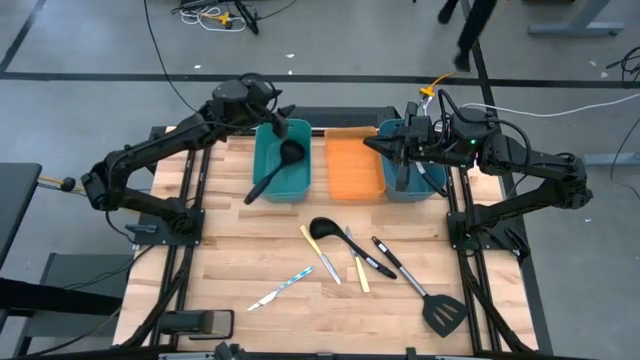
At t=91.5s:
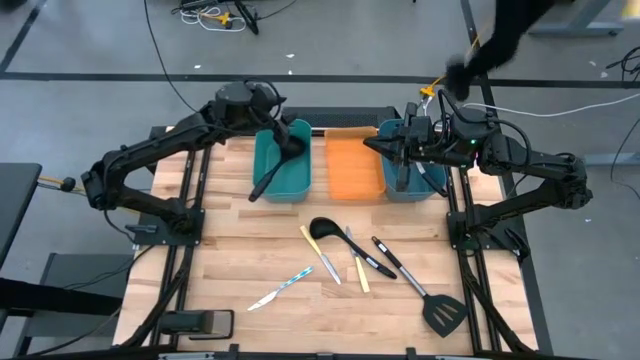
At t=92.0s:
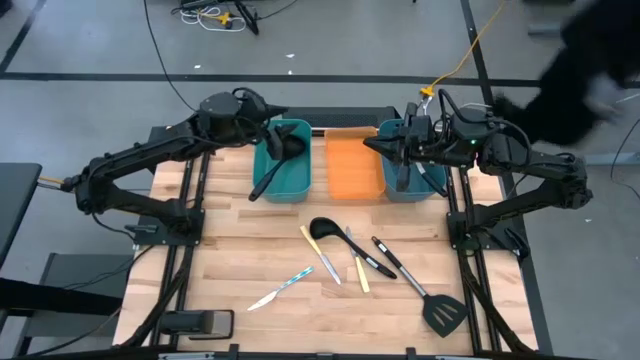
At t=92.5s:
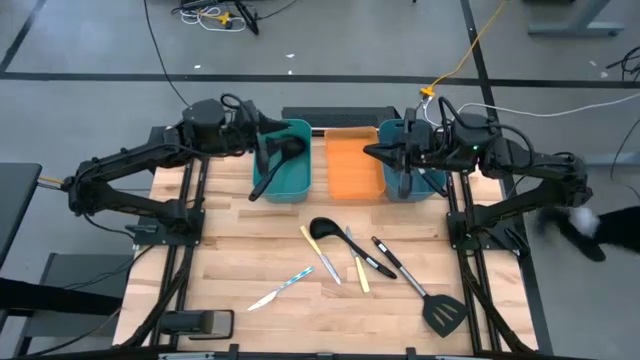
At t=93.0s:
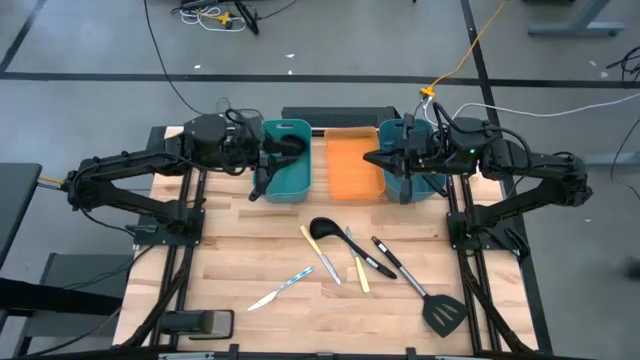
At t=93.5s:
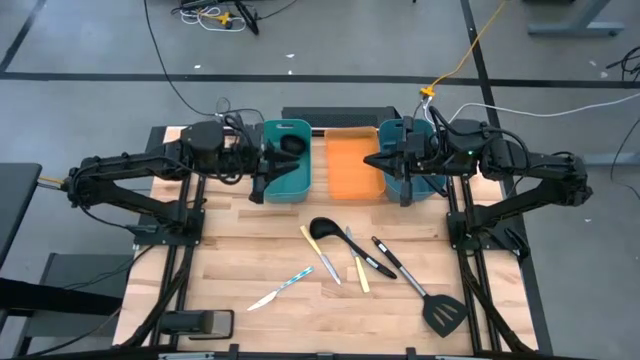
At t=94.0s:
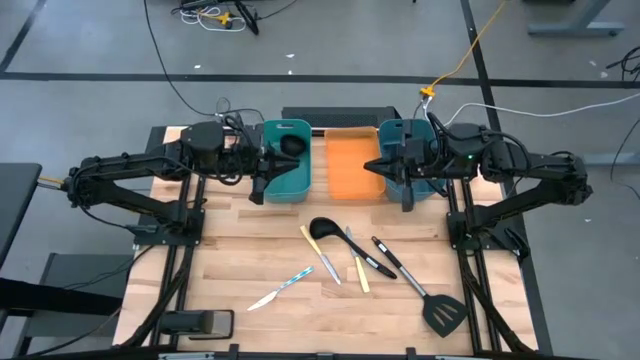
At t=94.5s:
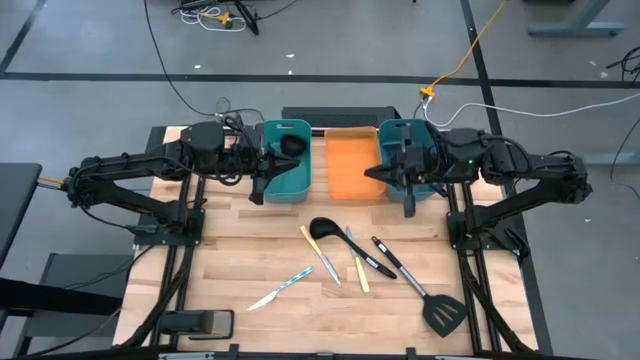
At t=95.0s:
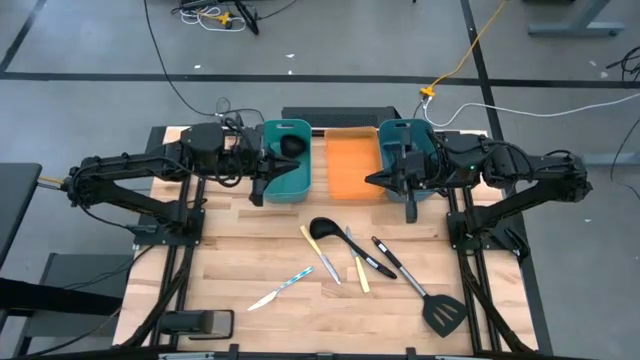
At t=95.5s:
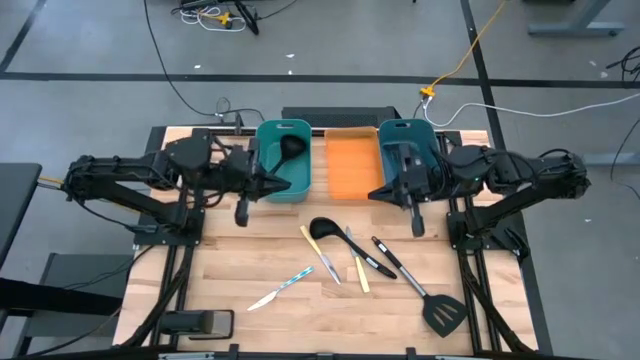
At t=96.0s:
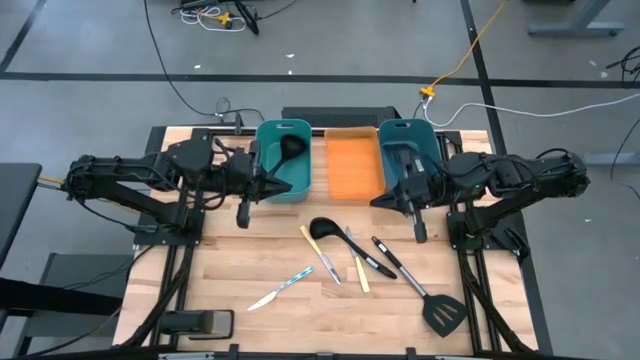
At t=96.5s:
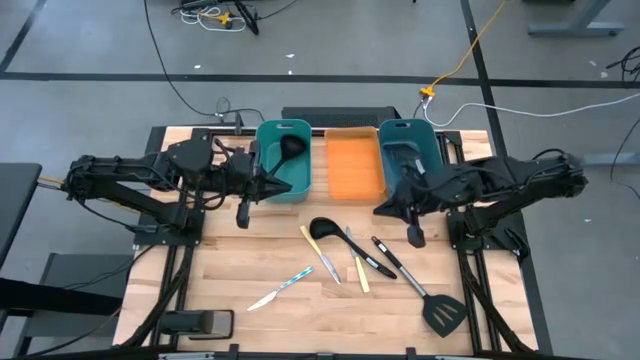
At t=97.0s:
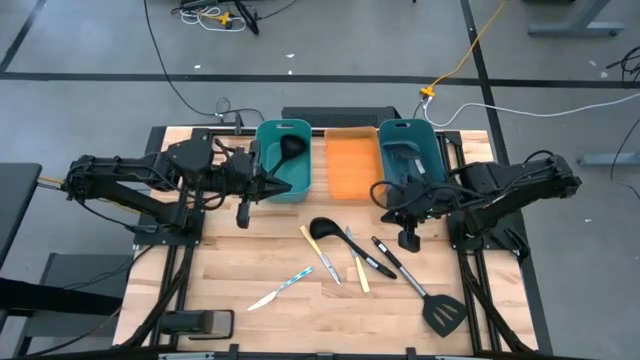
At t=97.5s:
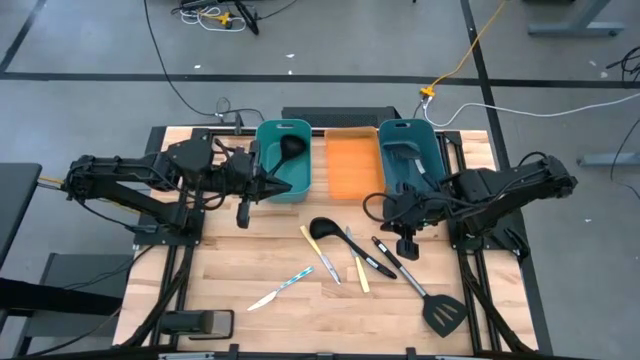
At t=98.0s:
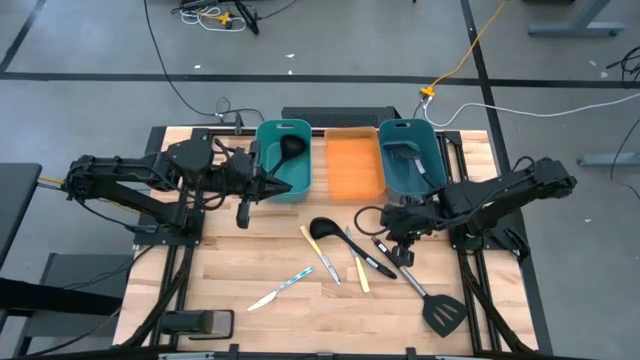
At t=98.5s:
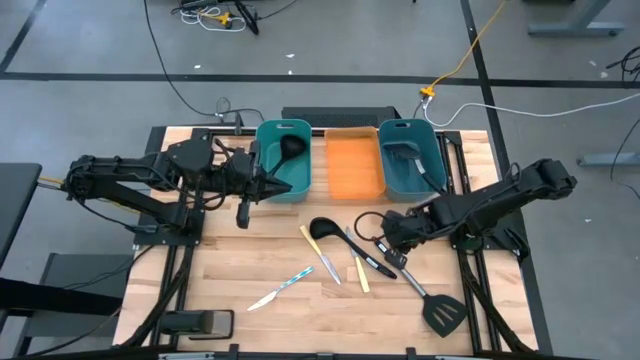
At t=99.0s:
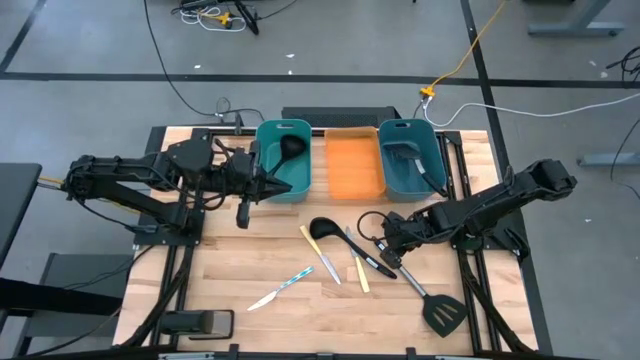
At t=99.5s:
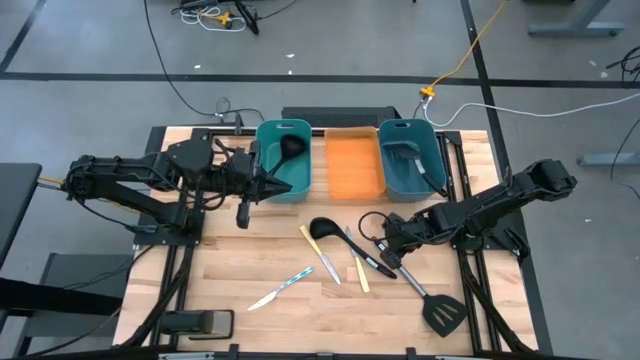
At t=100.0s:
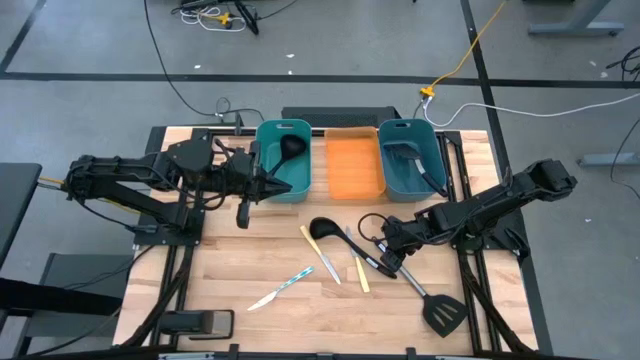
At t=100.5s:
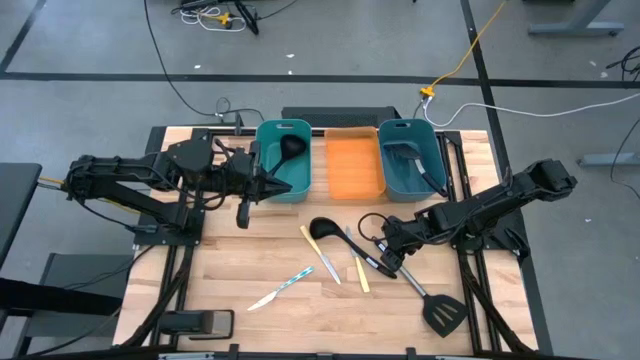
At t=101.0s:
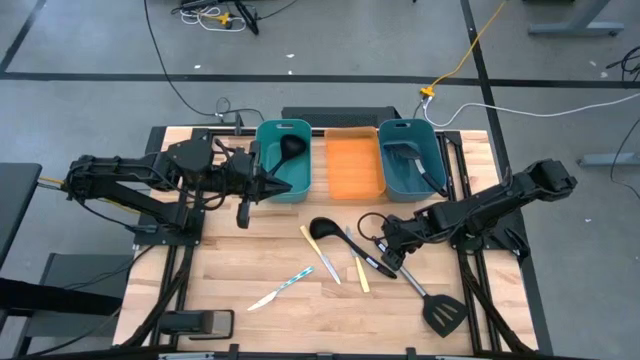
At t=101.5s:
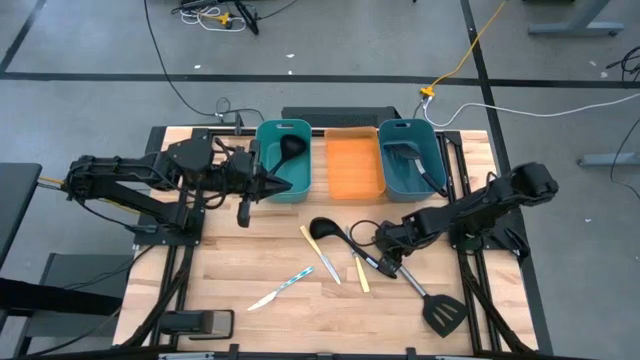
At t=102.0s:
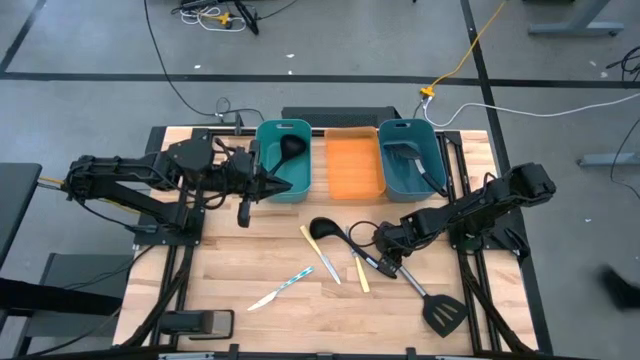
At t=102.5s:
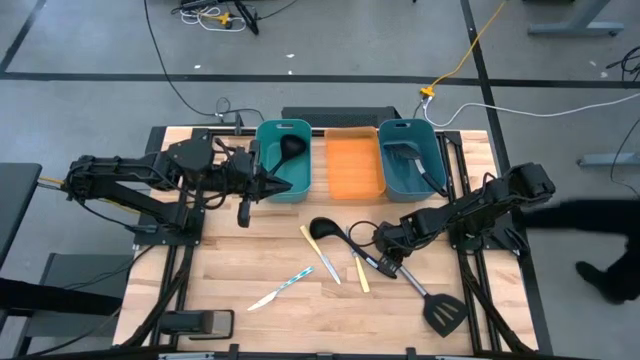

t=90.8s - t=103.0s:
Task: Pick & Place Kitchen Items
Put the black spatula into the blue bin

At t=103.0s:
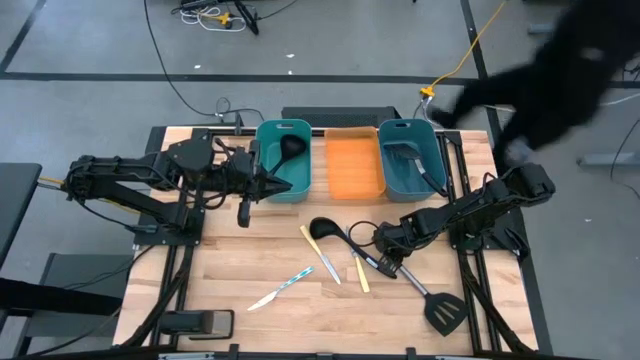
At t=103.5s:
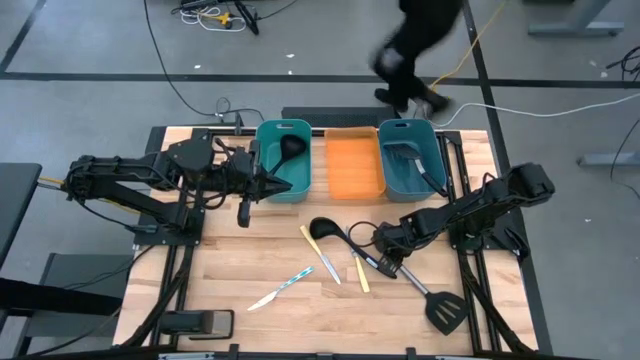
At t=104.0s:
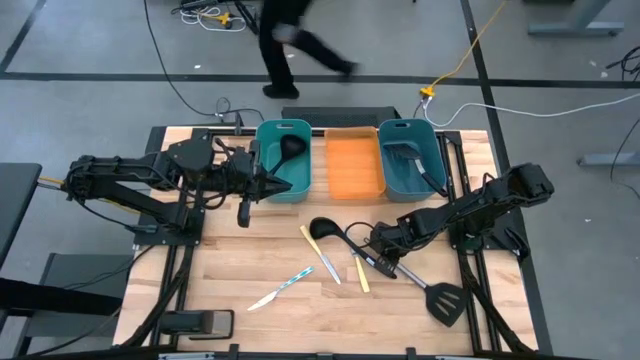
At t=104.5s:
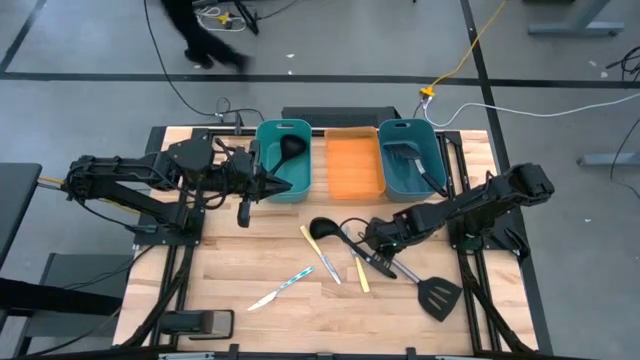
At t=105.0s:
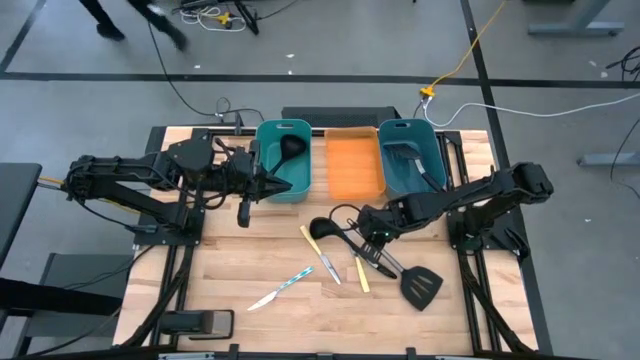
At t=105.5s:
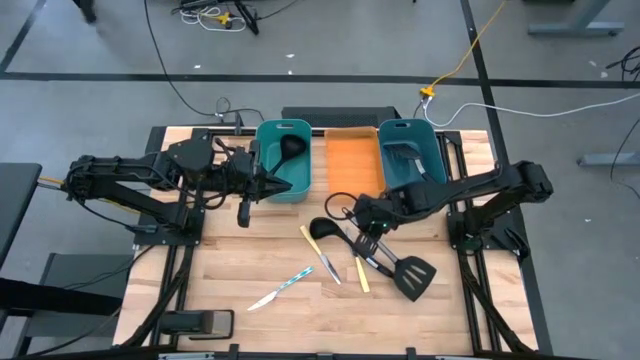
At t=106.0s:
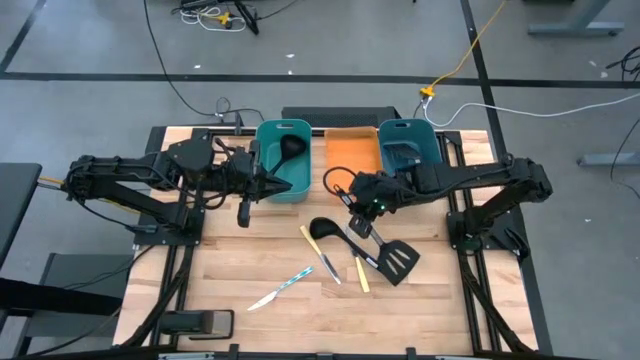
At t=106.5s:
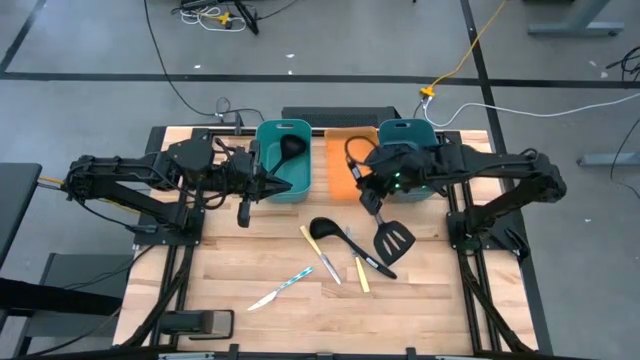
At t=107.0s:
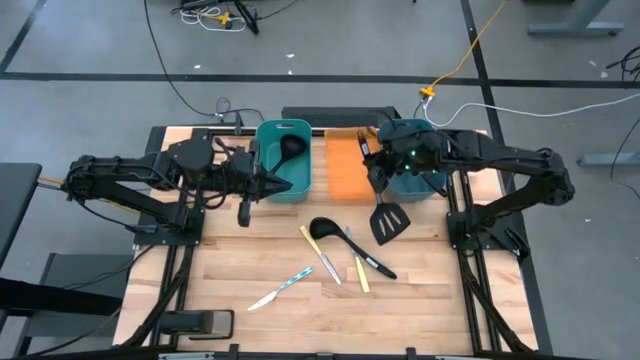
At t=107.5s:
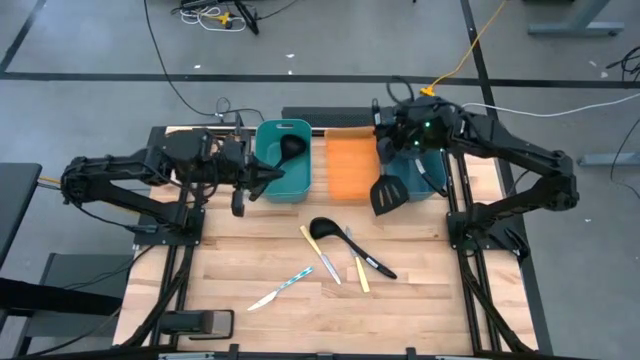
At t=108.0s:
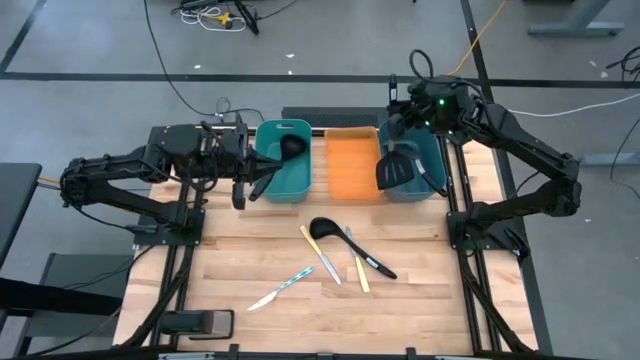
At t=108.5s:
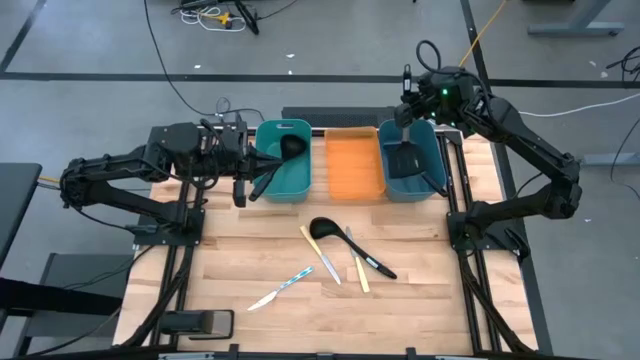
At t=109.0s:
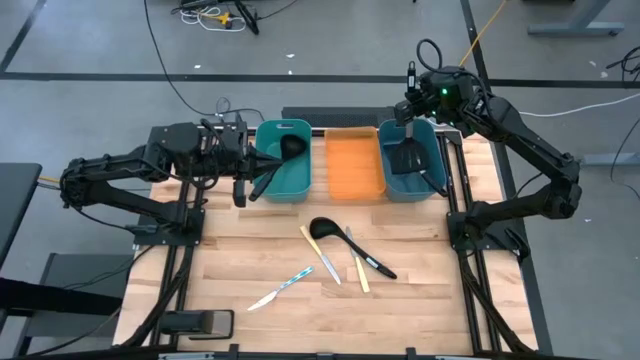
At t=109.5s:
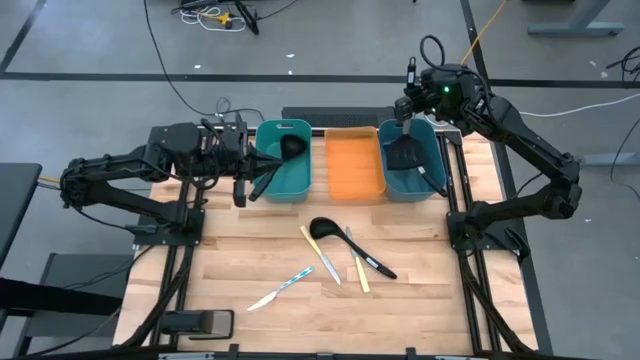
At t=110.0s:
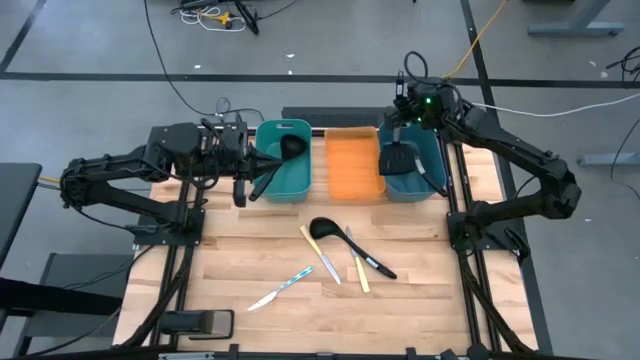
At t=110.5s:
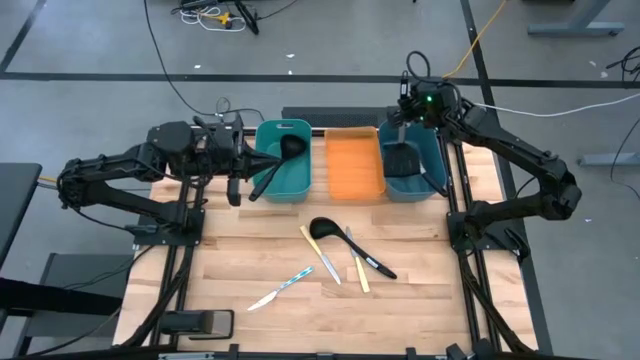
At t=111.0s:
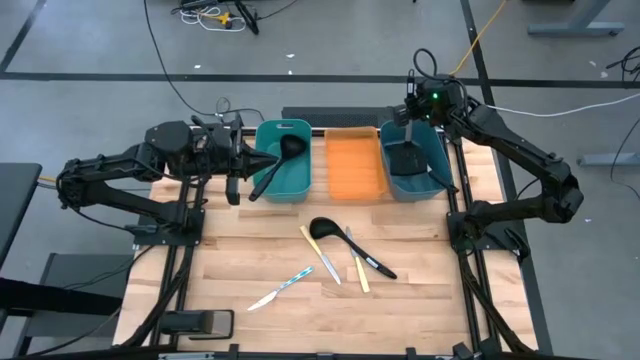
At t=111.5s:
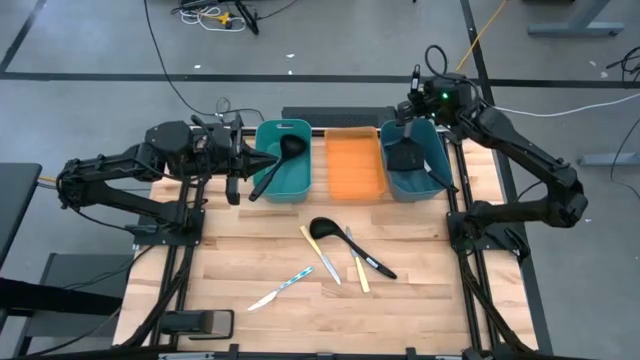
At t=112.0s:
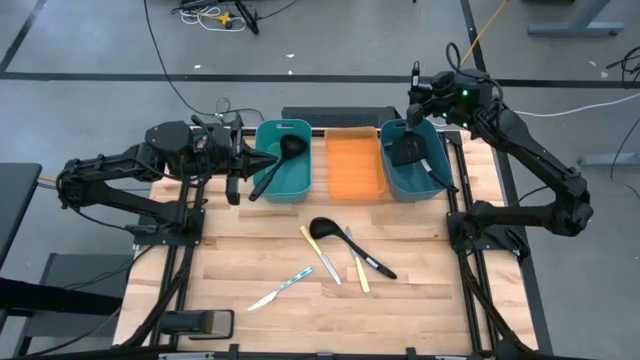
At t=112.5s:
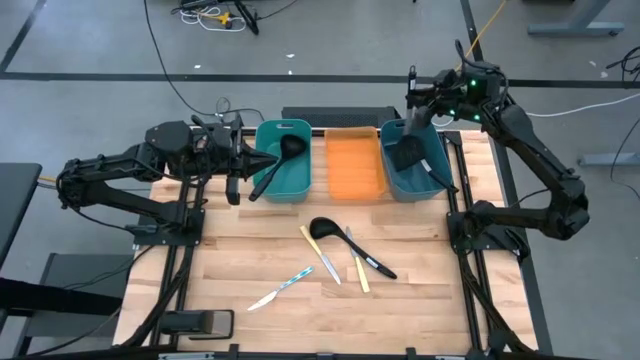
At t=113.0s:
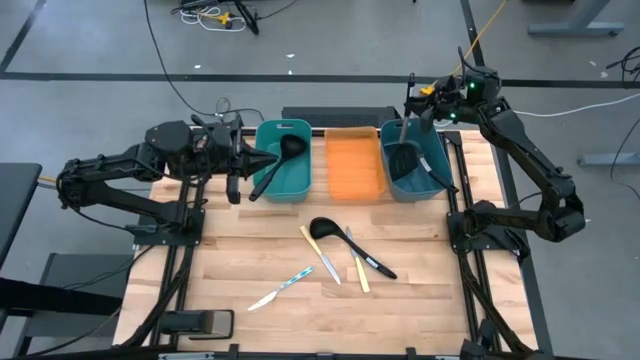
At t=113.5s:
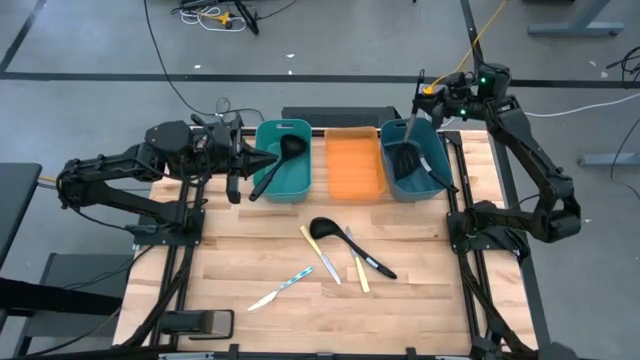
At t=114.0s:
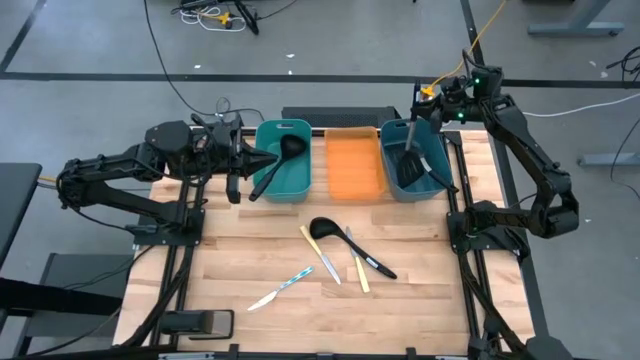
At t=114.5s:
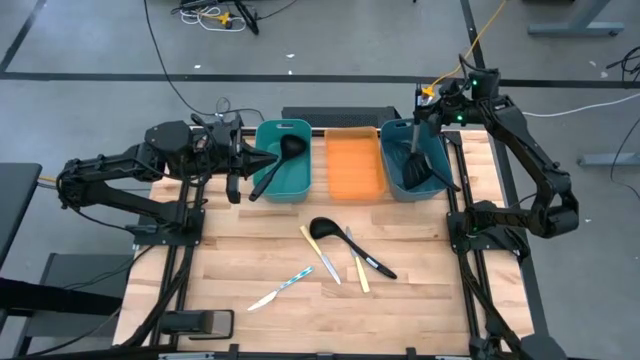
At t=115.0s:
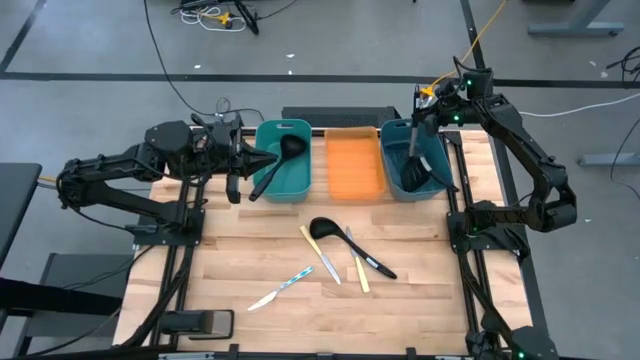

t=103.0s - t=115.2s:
Put the black spatula into the blue bin
